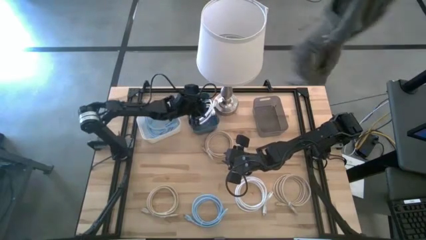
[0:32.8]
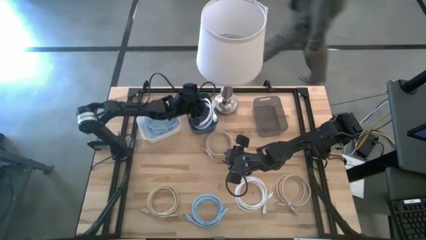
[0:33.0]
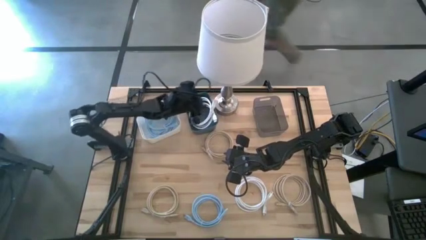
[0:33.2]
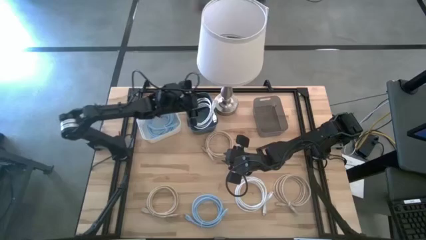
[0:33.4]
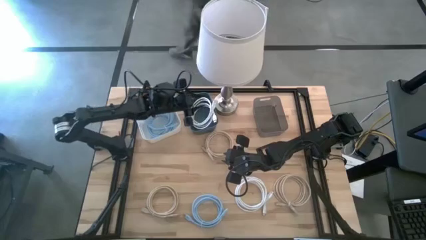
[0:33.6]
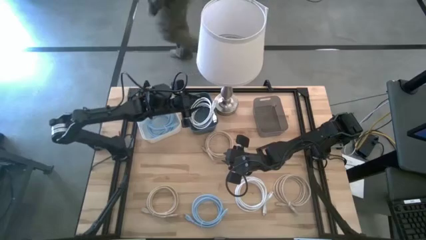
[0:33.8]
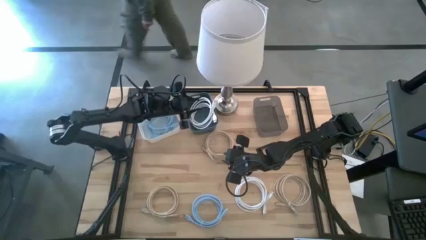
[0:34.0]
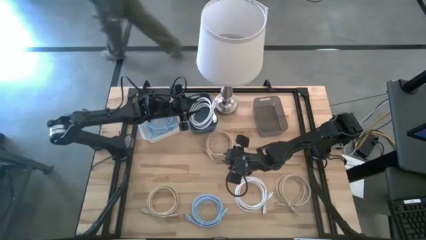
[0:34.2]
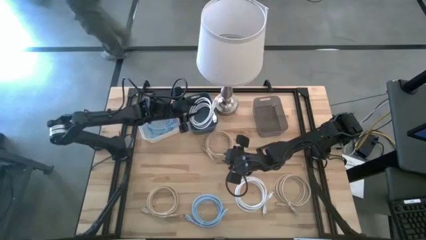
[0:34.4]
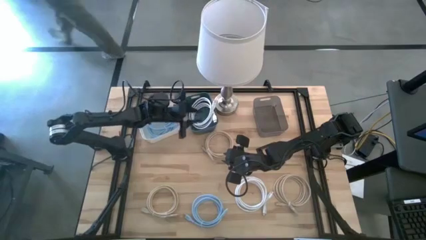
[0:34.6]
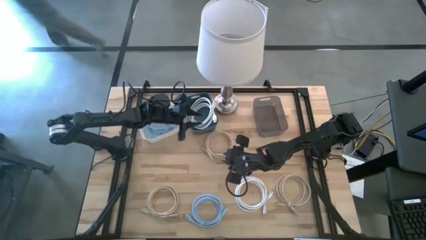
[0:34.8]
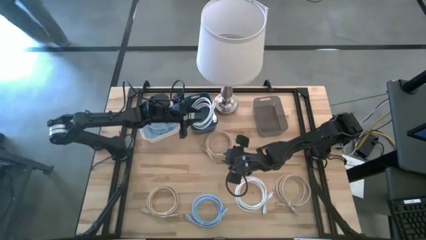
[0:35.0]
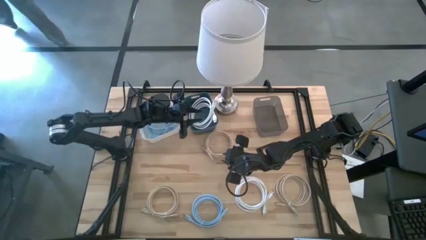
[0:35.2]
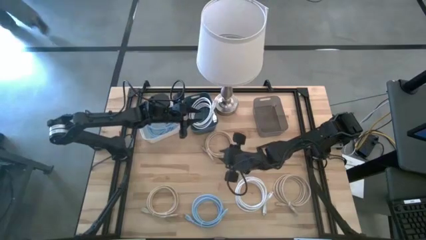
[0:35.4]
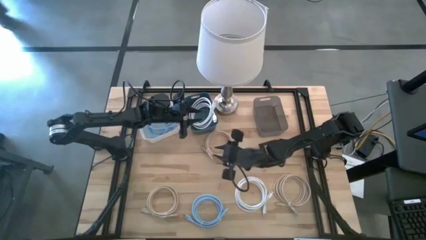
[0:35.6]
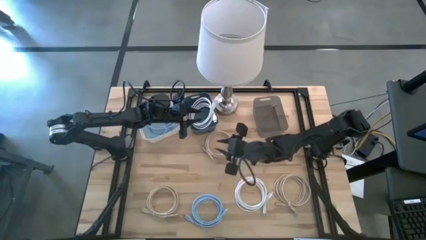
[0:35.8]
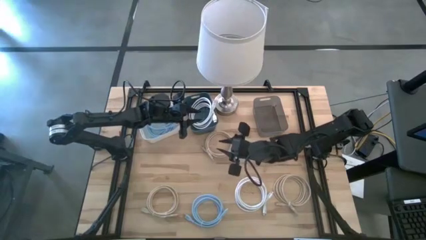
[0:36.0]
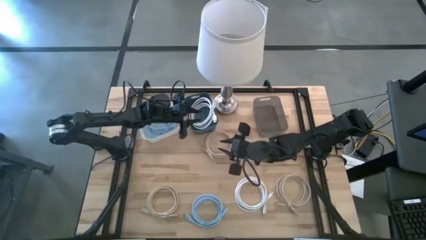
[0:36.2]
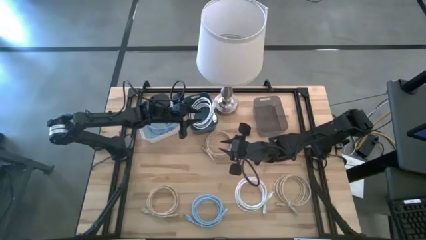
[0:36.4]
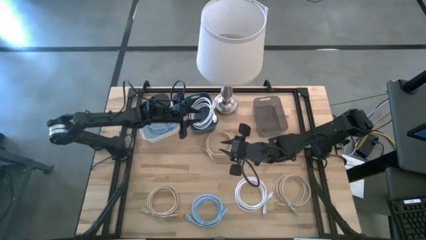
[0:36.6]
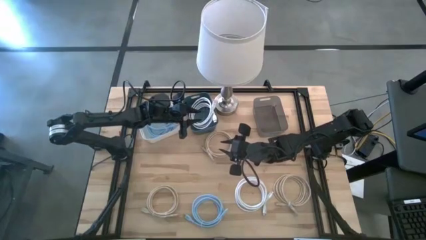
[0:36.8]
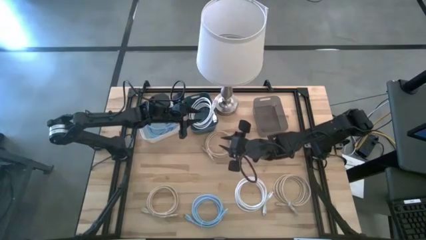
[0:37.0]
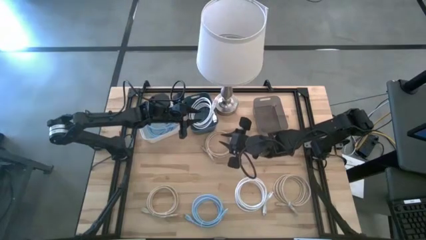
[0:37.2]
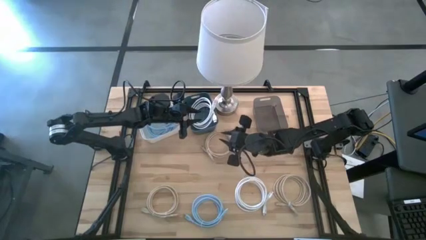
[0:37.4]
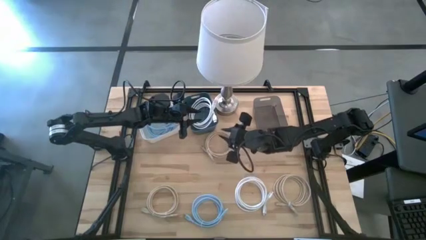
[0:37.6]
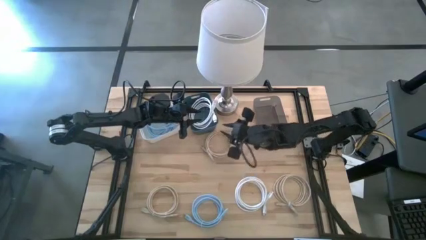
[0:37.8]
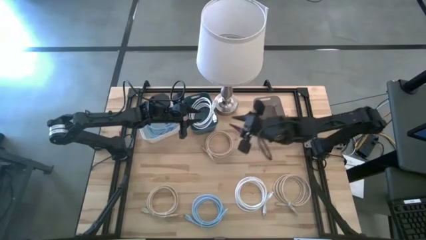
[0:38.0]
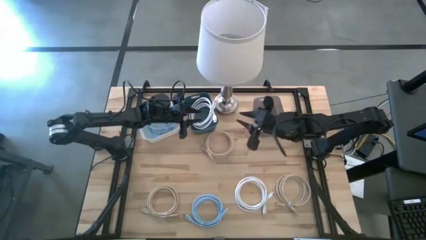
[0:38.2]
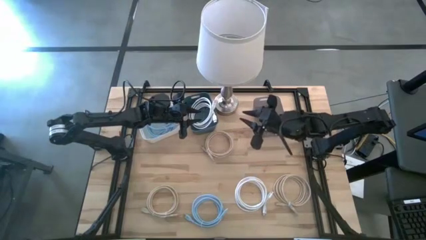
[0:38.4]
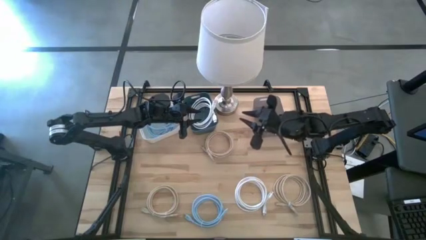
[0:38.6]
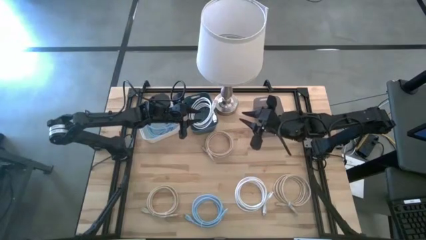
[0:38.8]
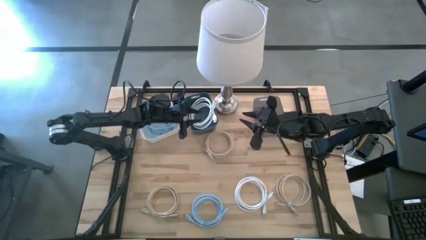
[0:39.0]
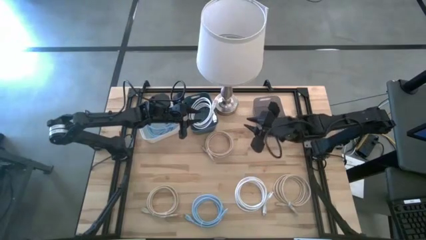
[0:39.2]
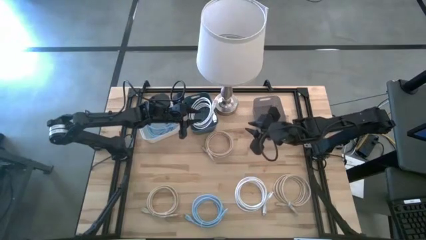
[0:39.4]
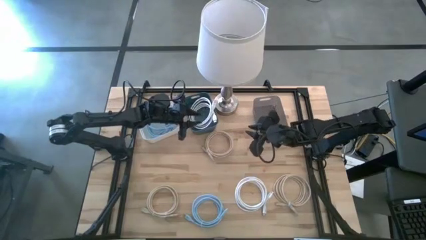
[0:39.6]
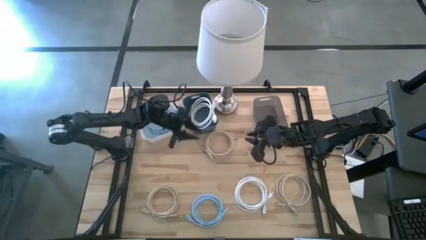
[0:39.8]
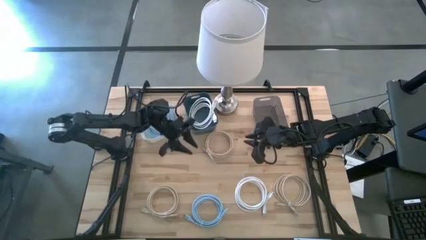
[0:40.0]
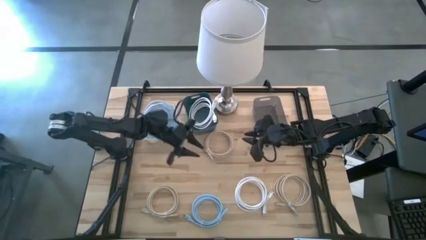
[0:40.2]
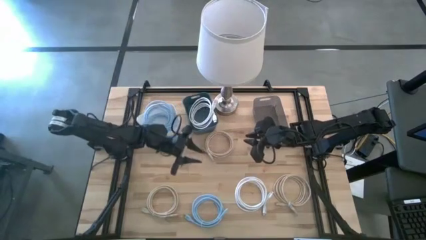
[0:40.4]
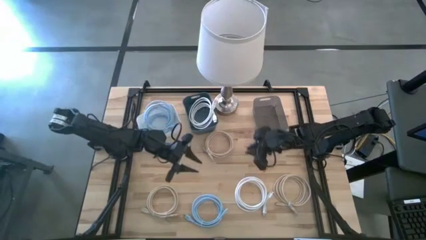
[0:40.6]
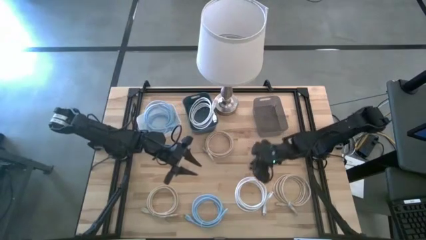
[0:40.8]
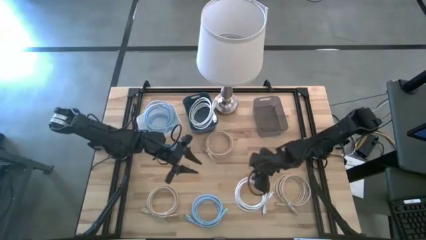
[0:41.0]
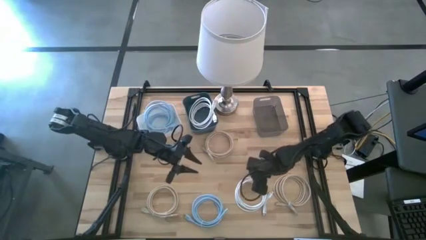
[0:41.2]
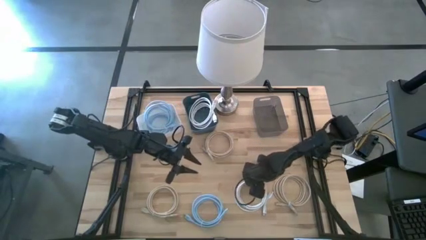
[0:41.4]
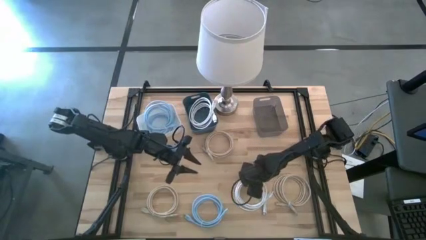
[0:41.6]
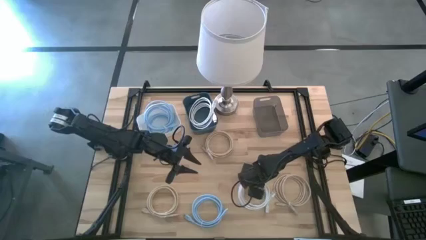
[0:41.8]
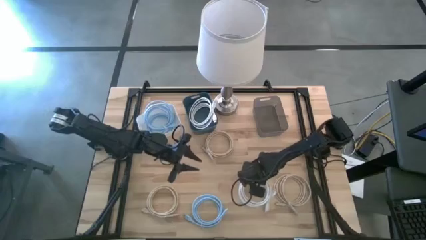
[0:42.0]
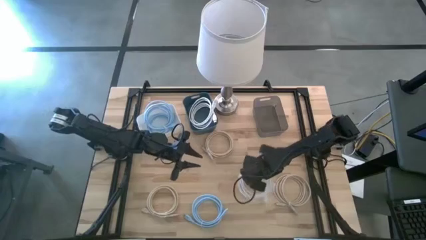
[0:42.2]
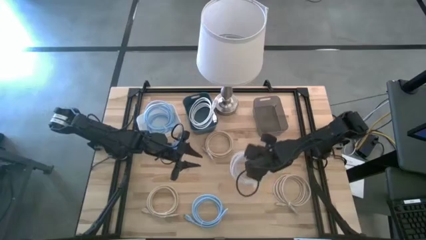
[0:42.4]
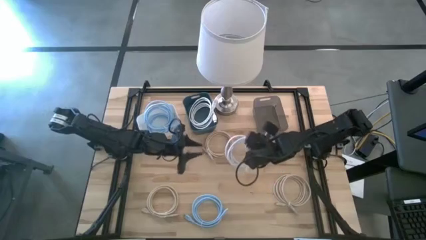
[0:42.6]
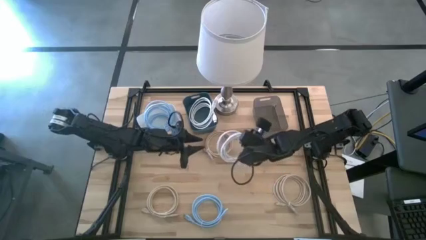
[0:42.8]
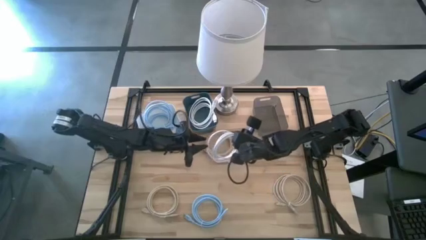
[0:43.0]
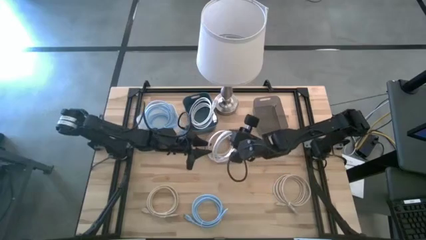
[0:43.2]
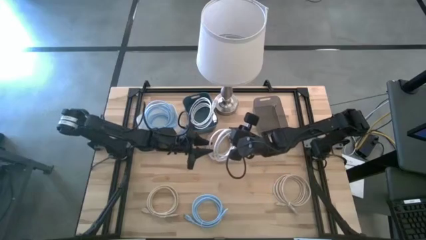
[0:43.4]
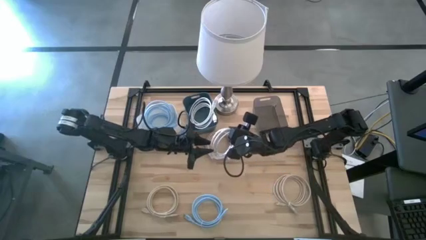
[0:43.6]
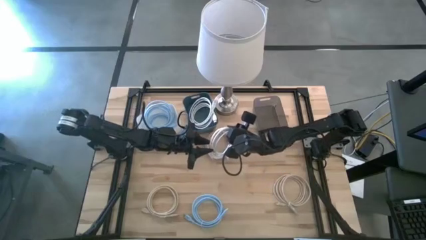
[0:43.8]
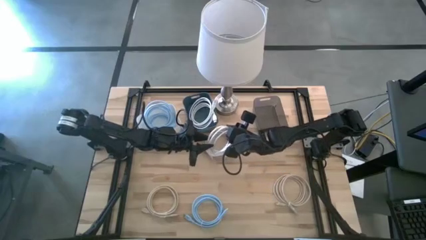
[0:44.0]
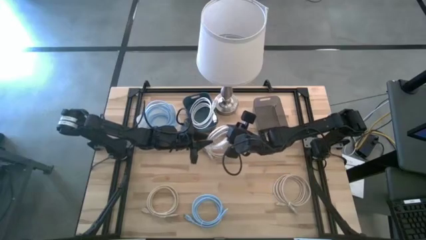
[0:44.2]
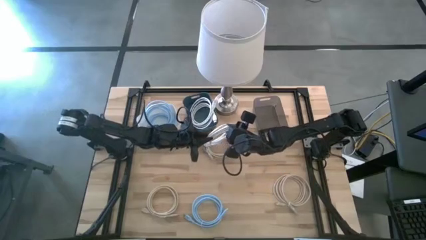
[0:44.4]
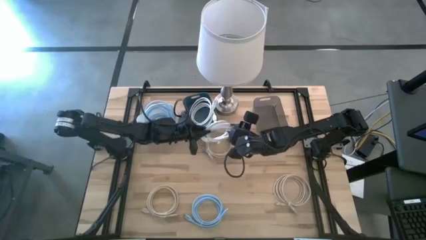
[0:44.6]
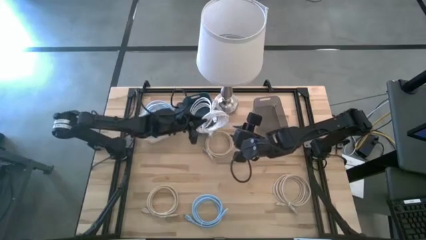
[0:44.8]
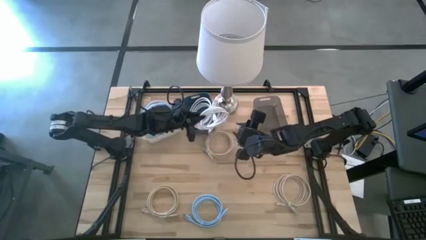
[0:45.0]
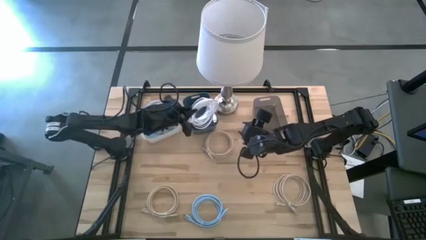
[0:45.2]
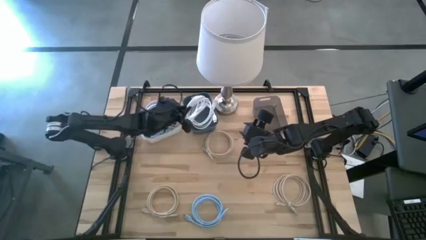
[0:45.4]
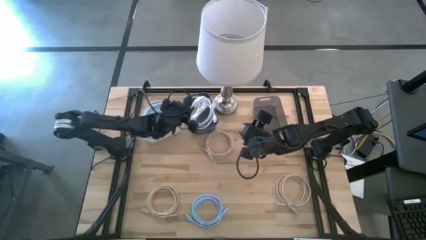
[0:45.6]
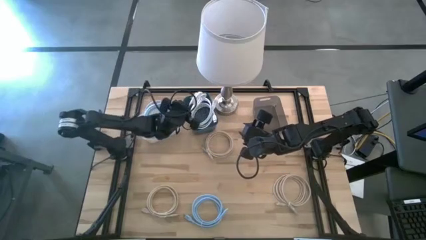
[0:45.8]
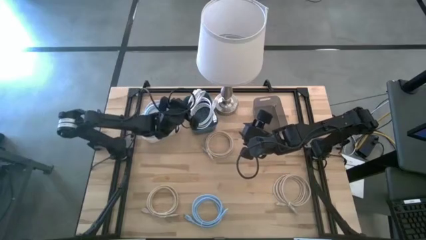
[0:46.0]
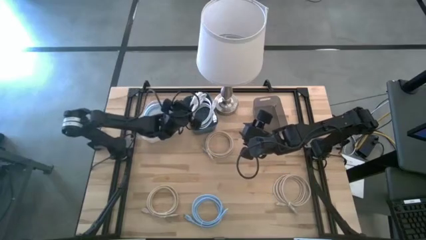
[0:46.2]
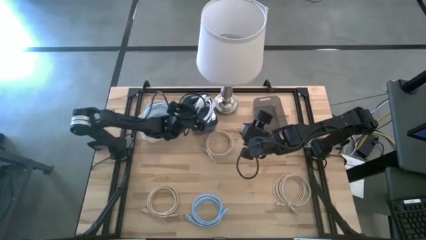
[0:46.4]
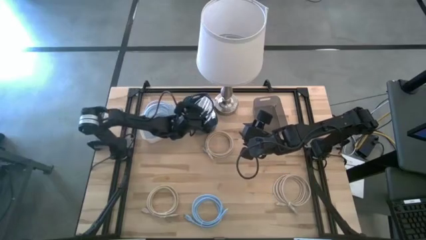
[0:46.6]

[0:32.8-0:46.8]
Task: Pick & Place USB Port
Put the white charger cable into the blue bin

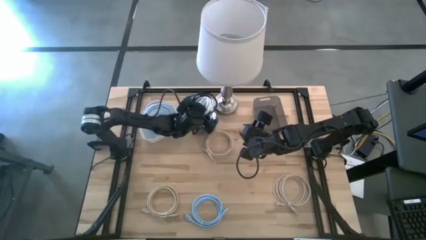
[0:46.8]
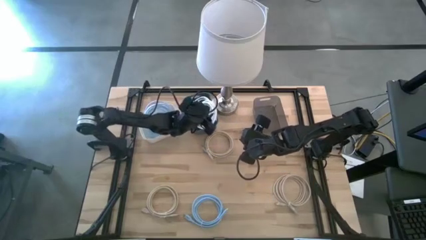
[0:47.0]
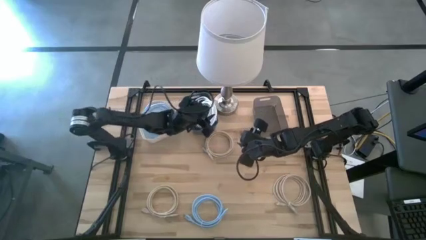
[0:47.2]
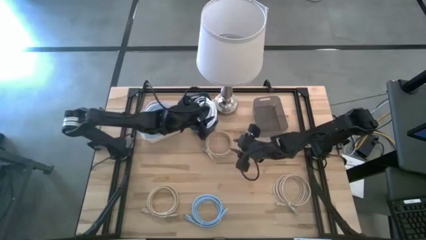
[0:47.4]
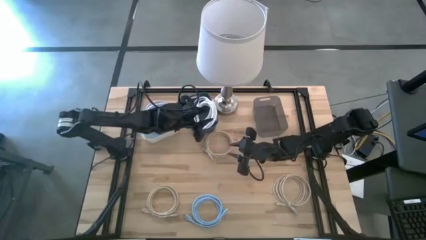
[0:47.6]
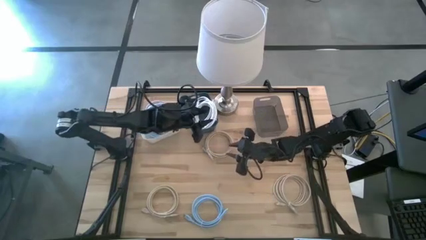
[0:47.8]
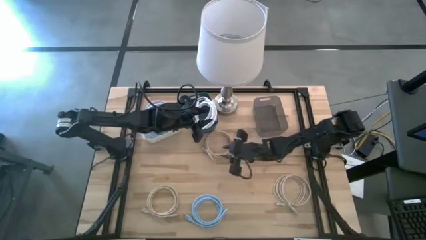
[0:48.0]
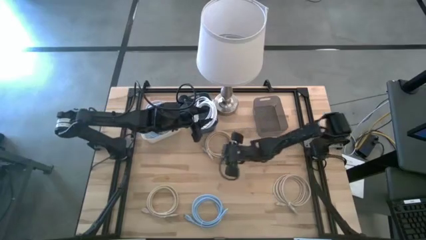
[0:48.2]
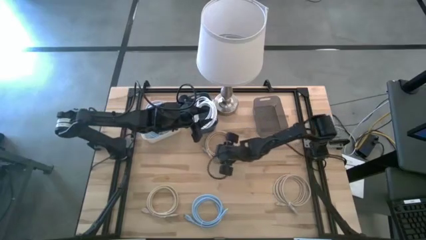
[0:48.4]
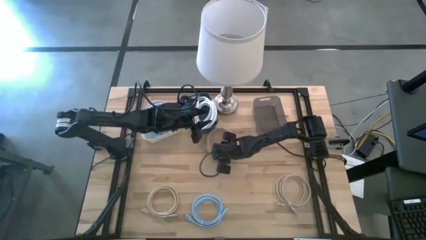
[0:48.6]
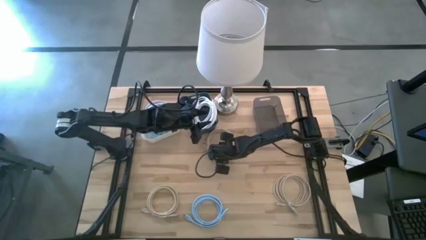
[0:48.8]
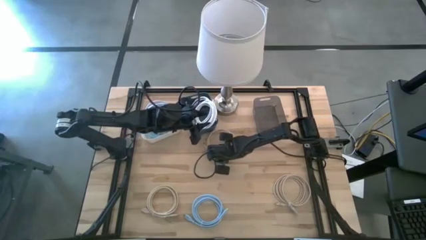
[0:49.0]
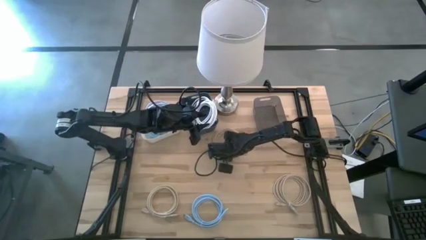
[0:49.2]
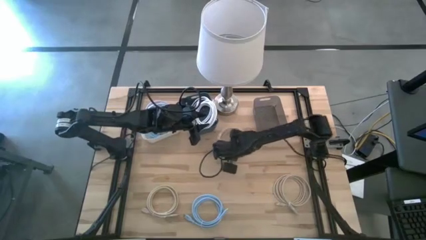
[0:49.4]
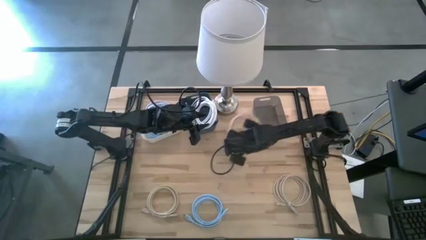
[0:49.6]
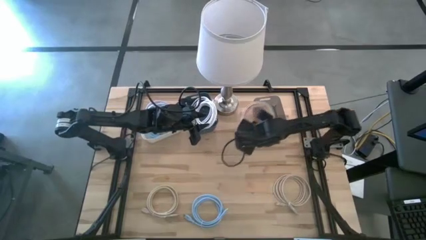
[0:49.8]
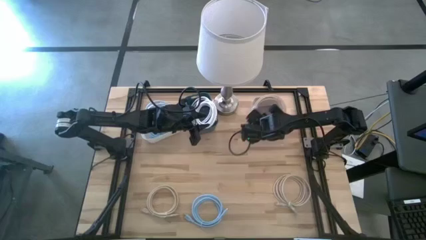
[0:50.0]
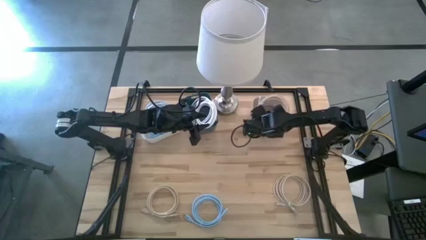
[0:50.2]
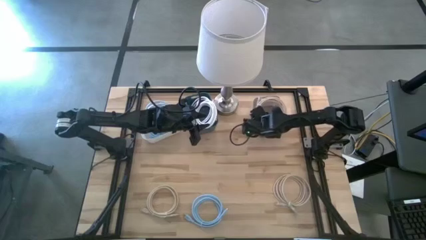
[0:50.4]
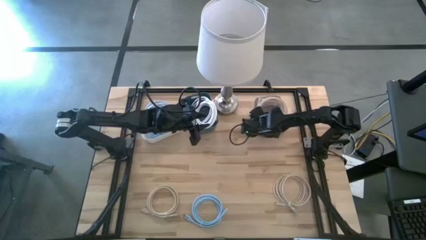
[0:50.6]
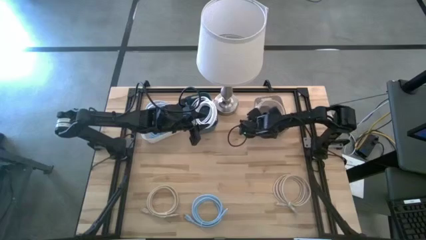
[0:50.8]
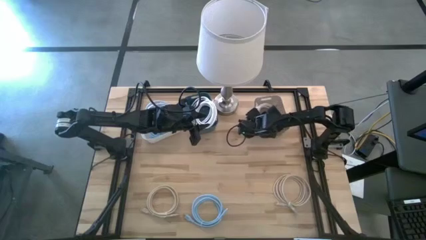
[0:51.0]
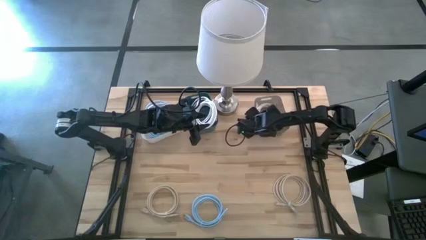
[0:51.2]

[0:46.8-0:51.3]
Put the top brown charger cable into the black bin
